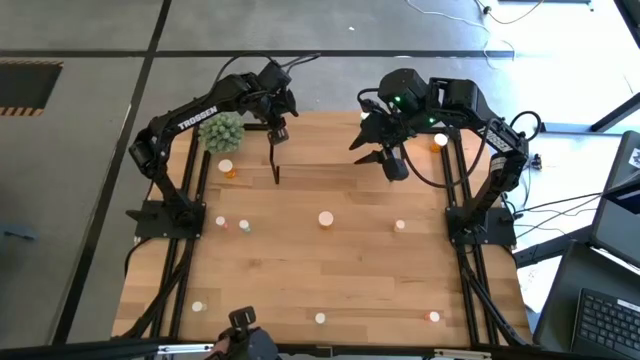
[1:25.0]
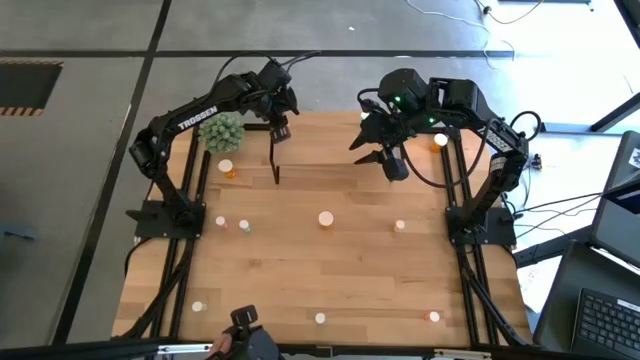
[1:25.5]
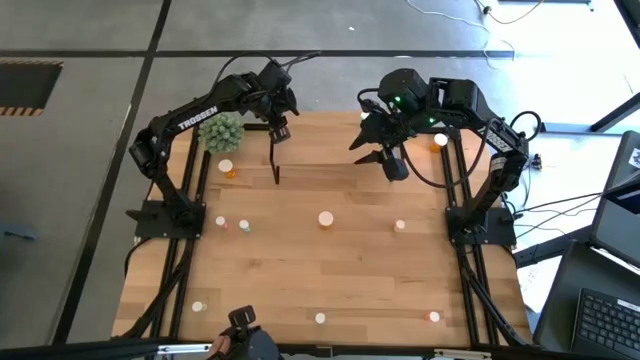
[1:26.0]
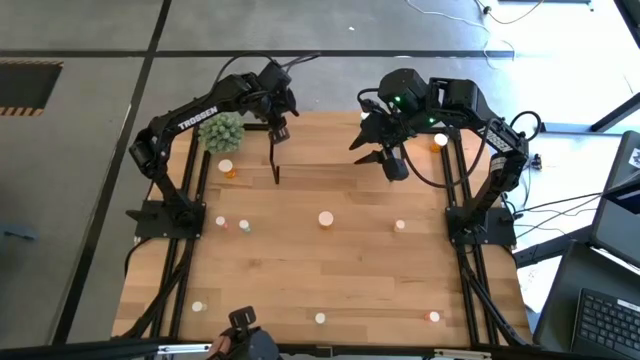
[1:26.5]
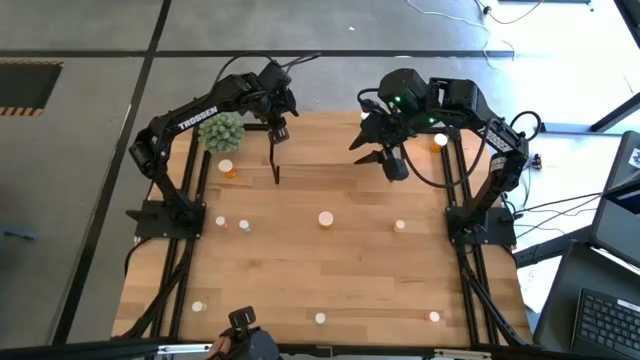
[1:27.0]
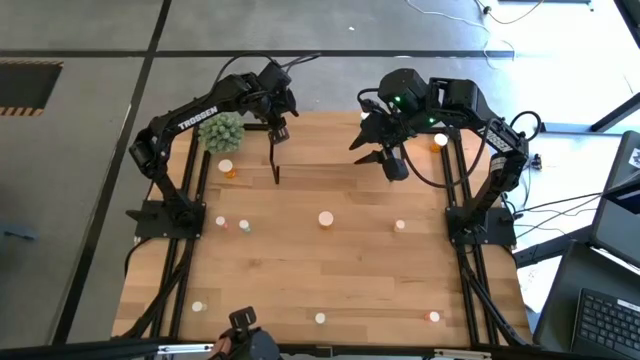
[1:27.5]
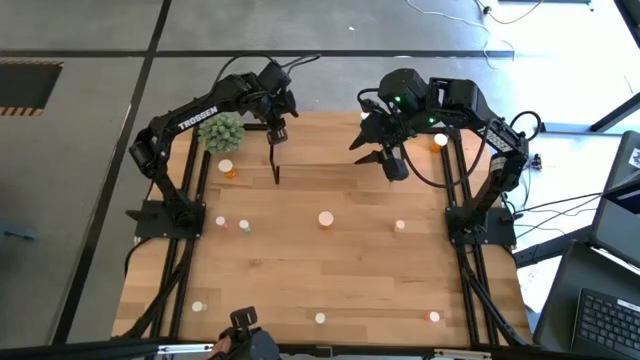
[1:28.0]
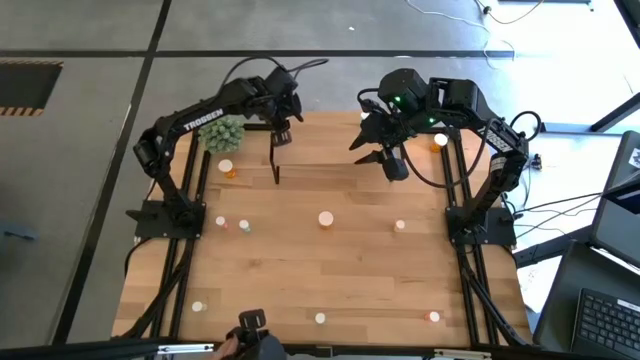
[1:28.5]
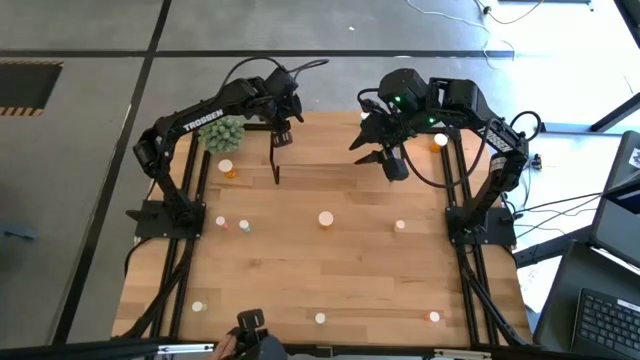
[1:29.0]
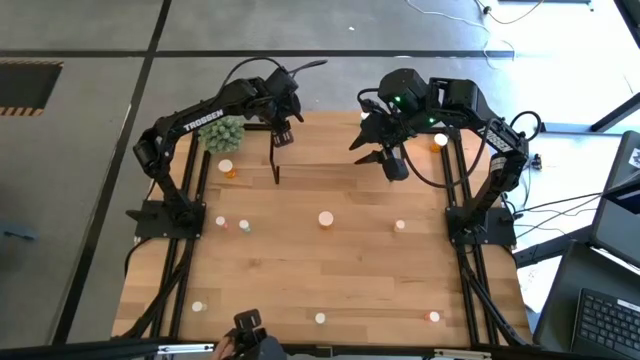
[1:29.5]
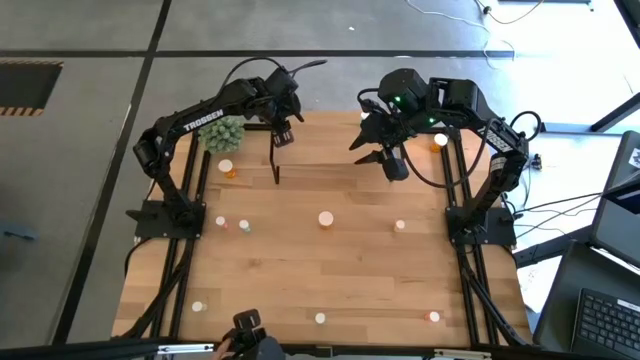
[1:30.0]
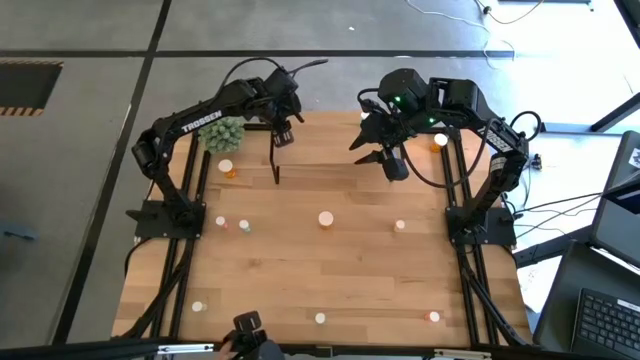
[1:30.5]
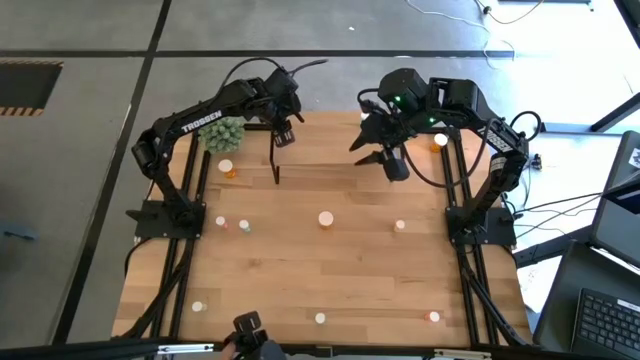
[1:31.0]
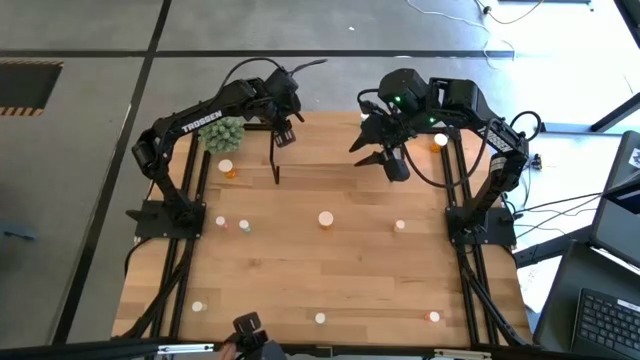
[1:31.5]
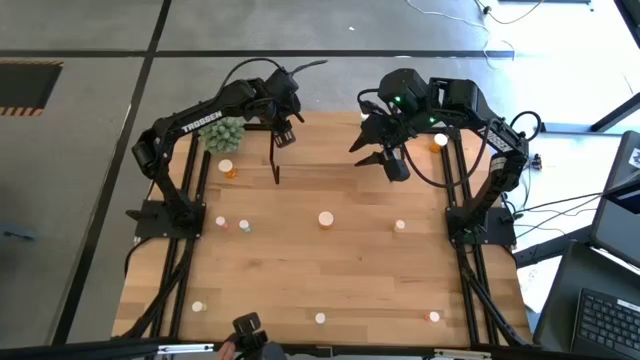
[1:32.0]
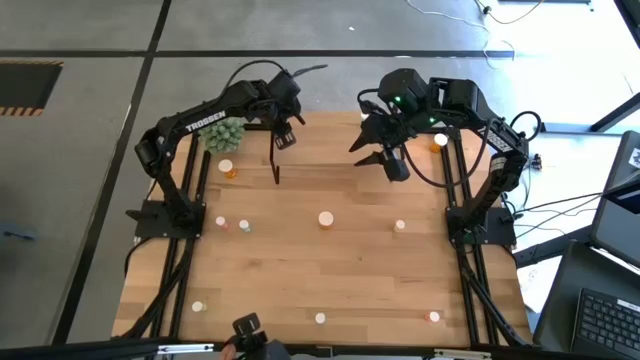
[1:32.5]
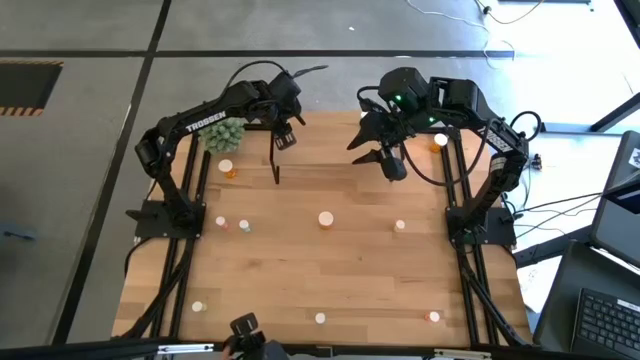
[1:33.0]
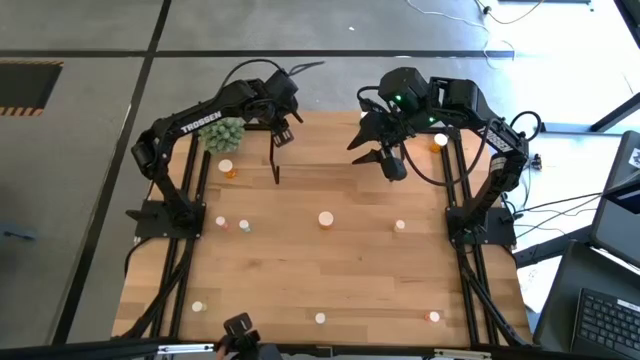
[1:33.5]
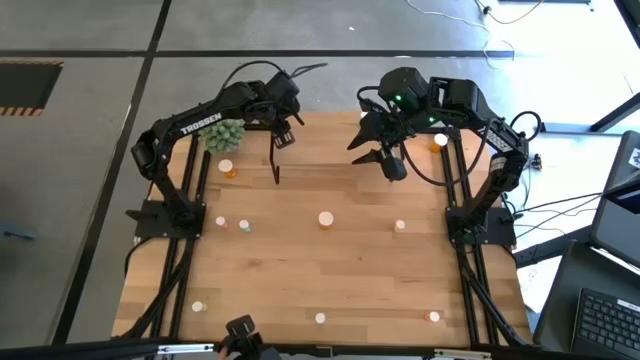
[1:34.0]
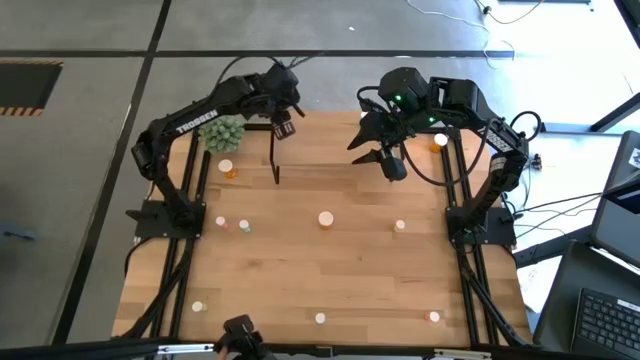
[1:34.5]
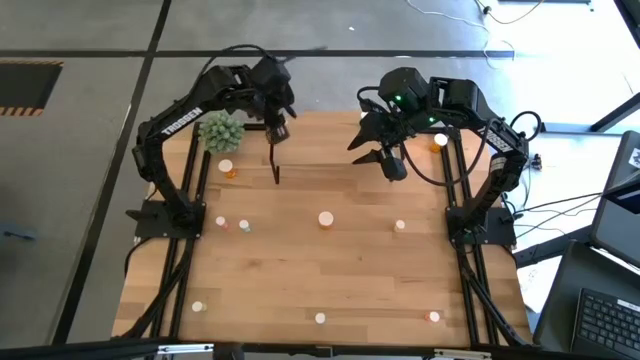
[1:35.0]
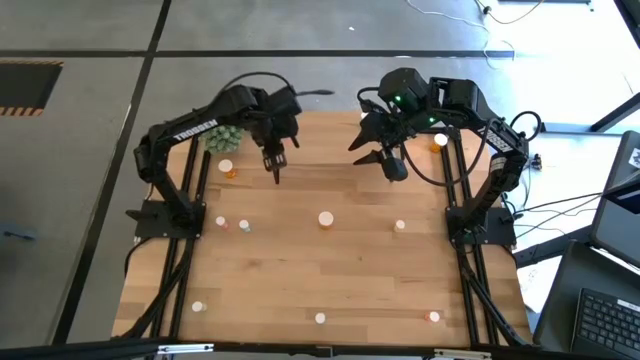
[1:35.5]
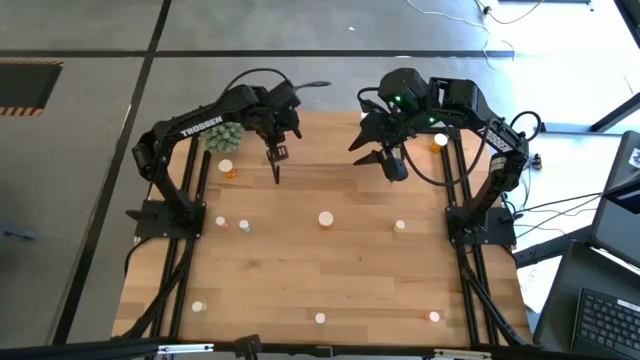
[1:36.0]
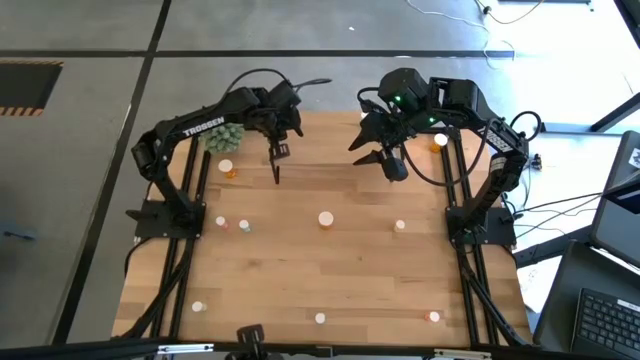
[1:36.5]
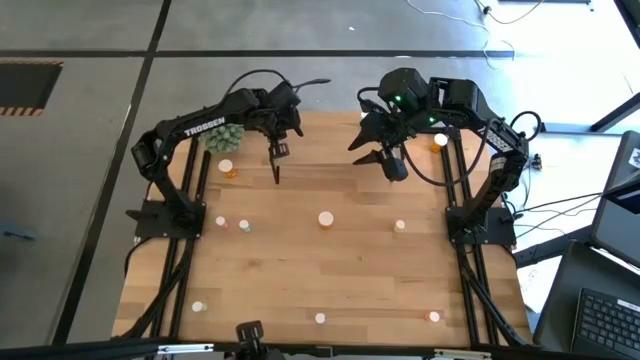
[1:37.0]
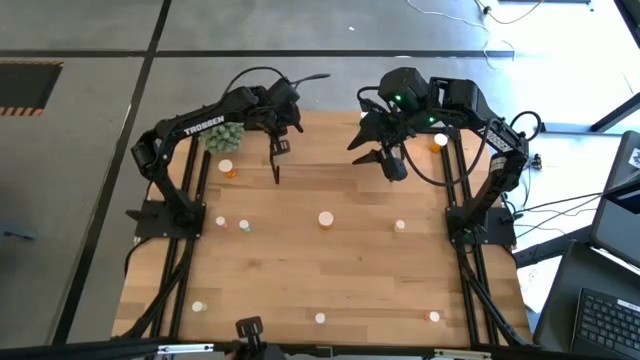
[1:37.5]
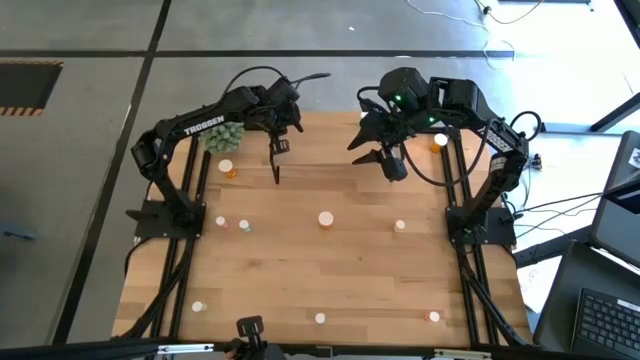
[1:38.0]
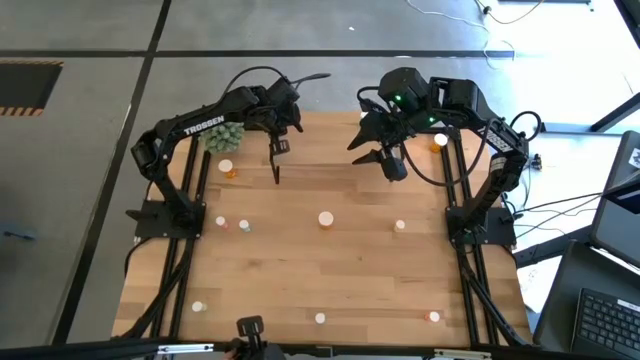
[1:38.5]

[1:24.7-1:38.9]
Task: Pick and place medicine bottles onto shelf by color
Put the top right red medicine bottle on the shelf

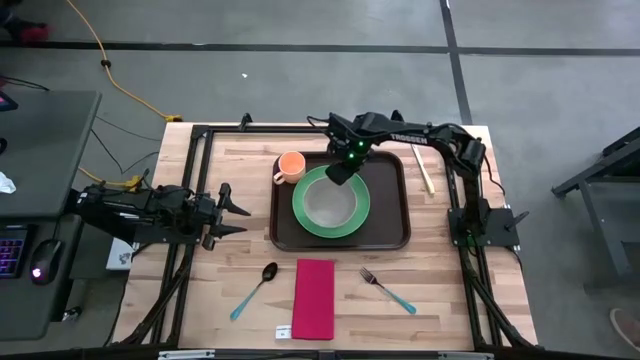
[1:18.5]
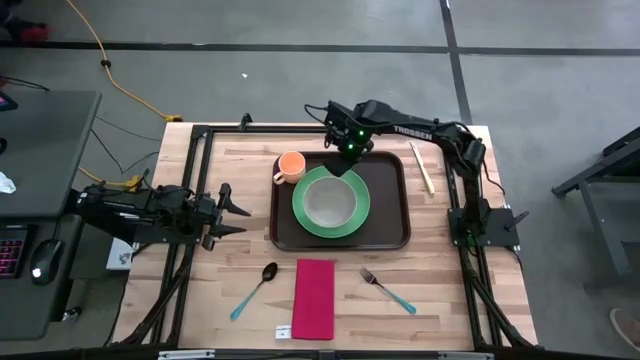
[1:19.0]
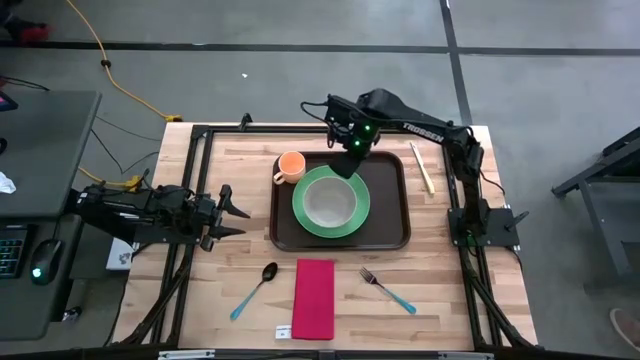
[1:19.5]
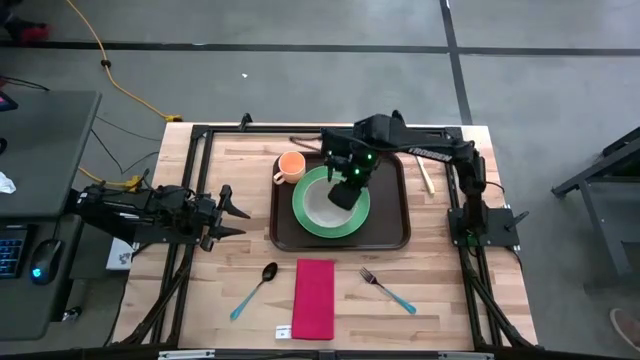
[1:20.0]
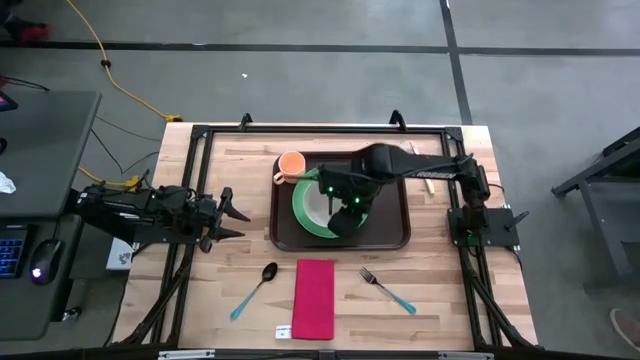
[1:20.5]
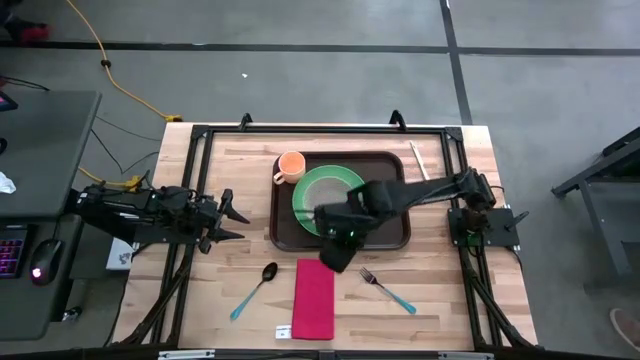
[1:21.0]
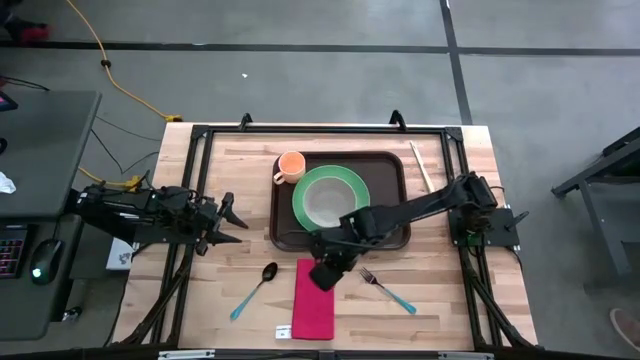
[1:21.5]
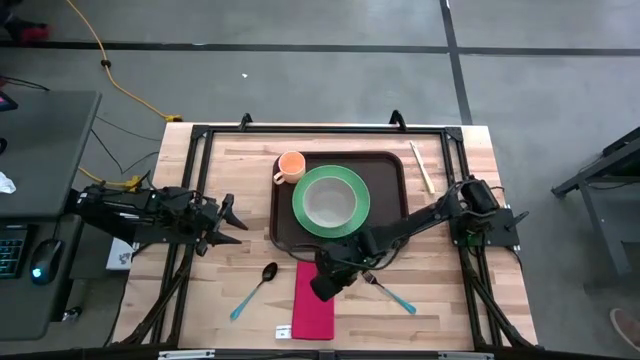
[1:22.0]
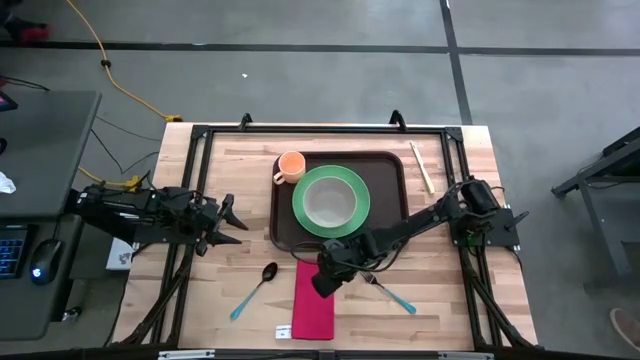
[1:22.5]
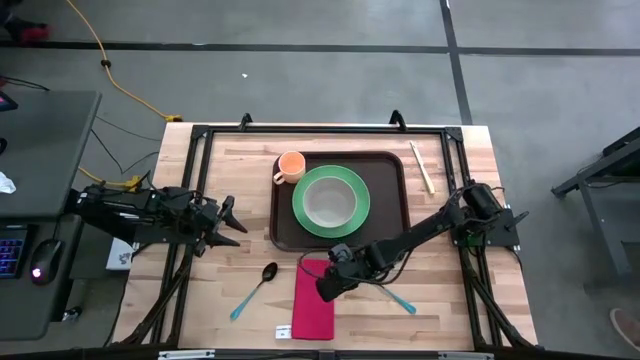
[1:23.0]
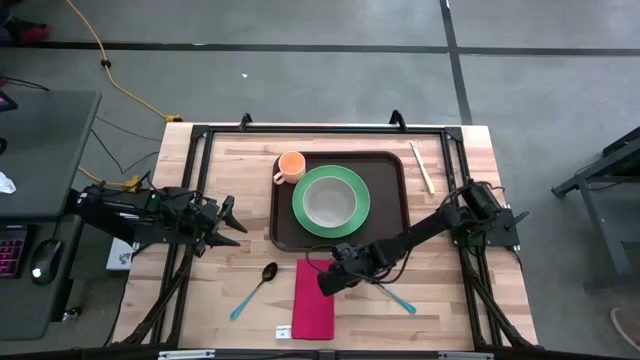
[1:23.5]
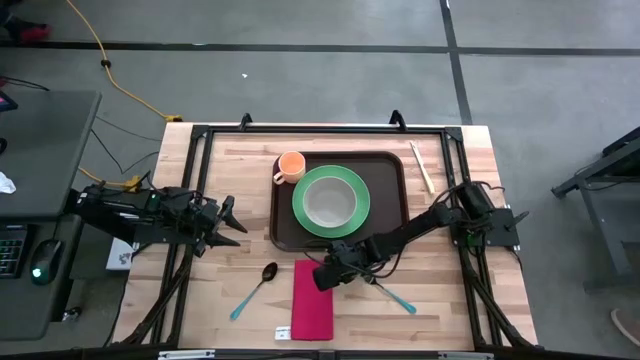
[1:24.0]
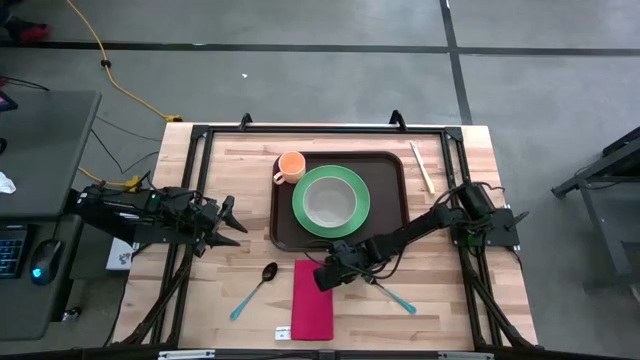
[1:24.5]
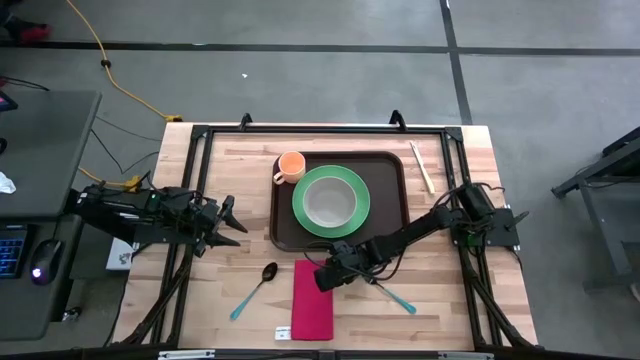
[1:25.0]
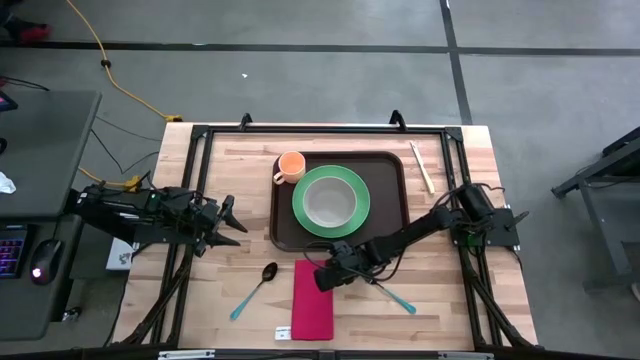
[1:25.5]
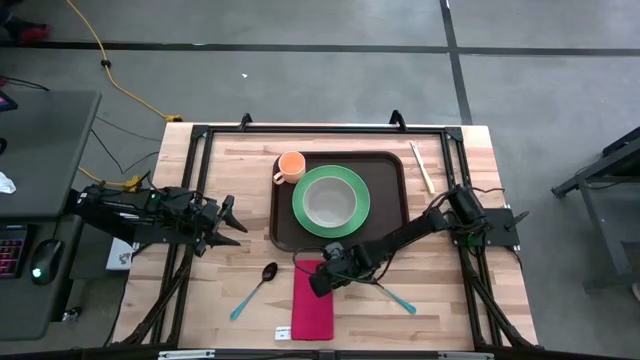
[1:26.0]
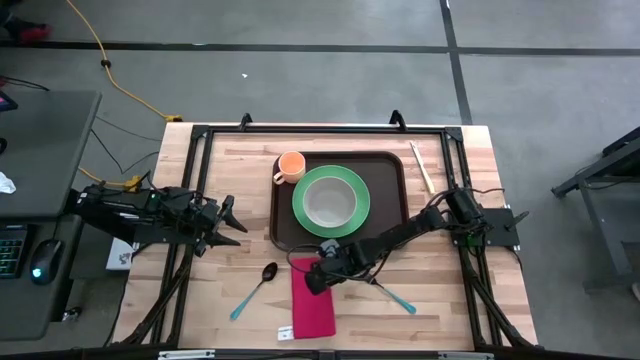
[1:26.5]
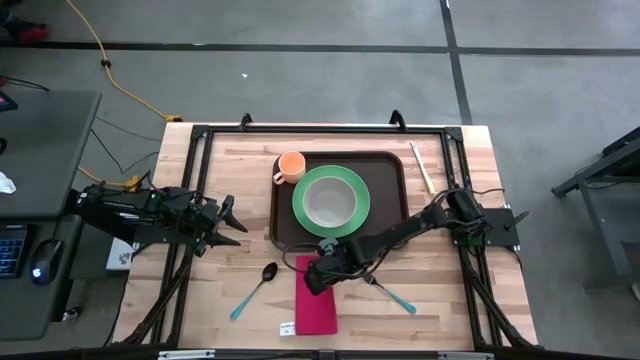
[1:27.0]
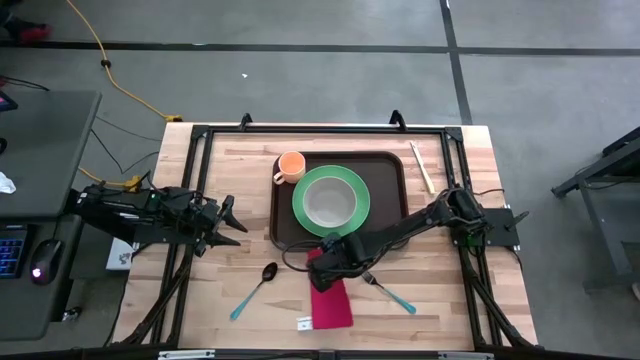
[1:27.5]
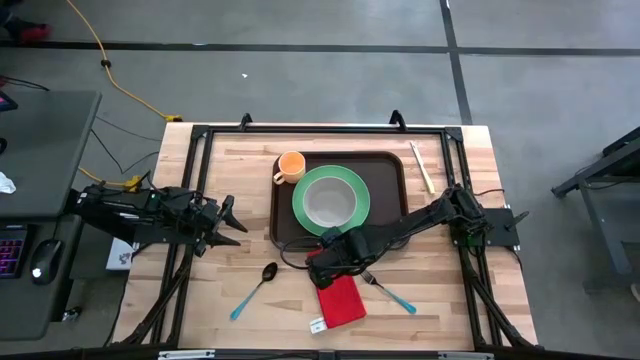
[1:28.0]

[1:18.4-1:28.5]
Task: Set up tray
Put the red napkin on the brown serving tray to the right of the green plate
